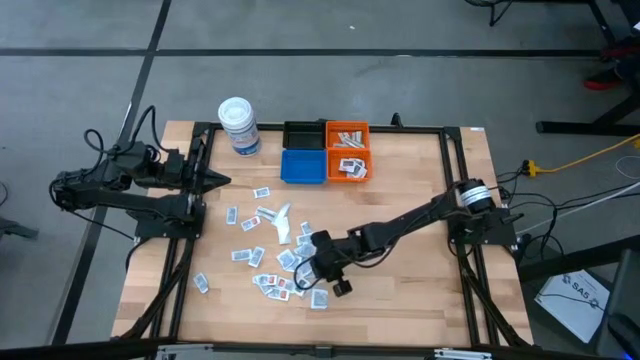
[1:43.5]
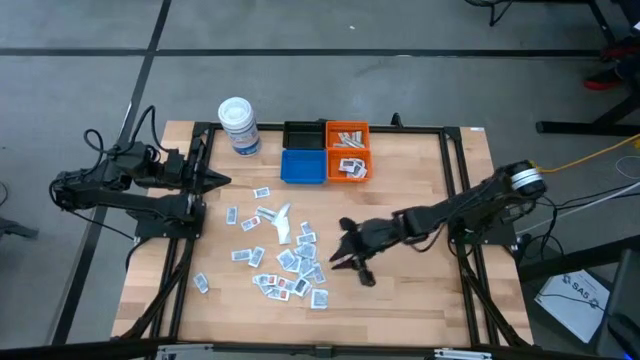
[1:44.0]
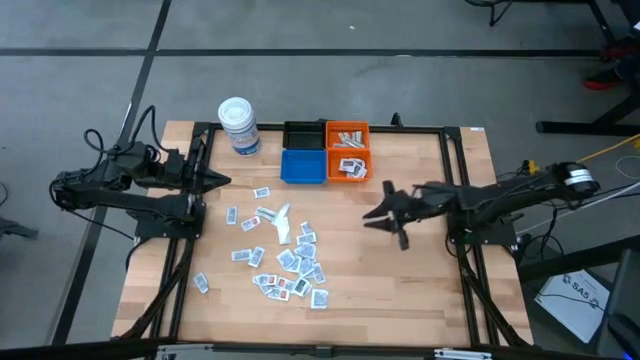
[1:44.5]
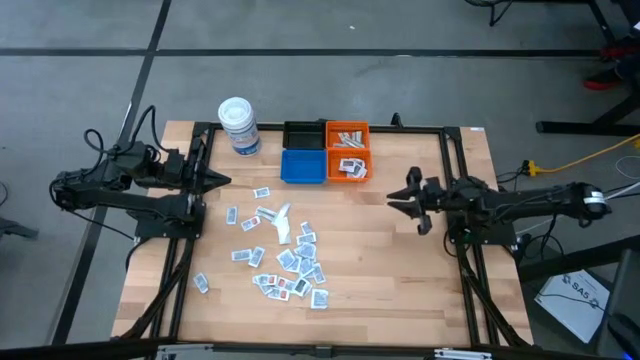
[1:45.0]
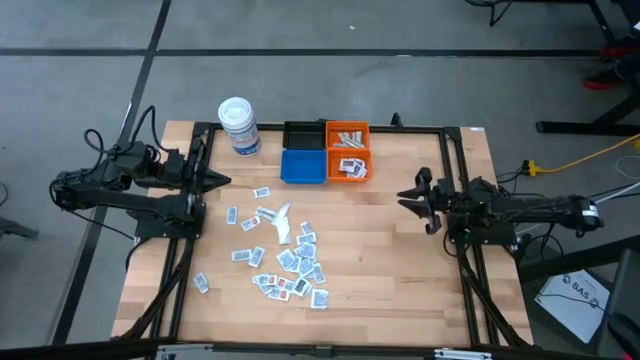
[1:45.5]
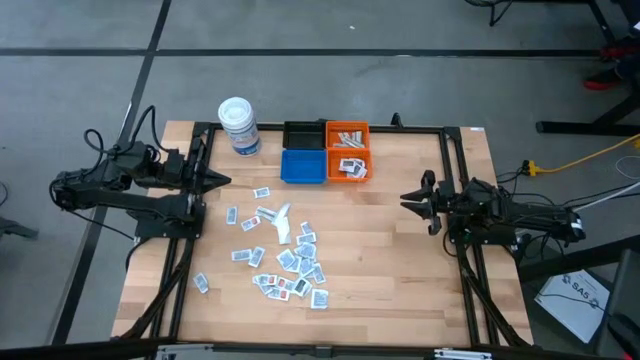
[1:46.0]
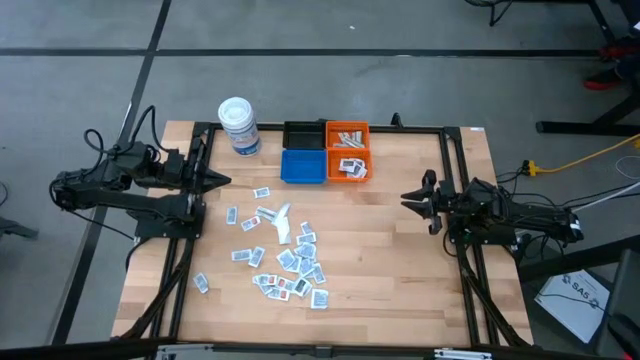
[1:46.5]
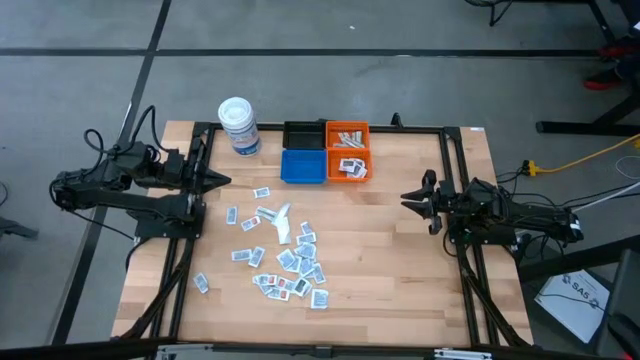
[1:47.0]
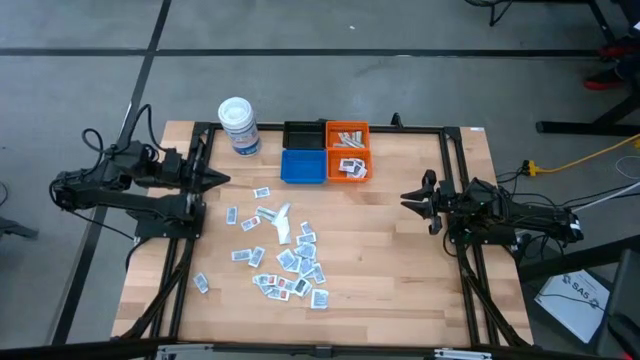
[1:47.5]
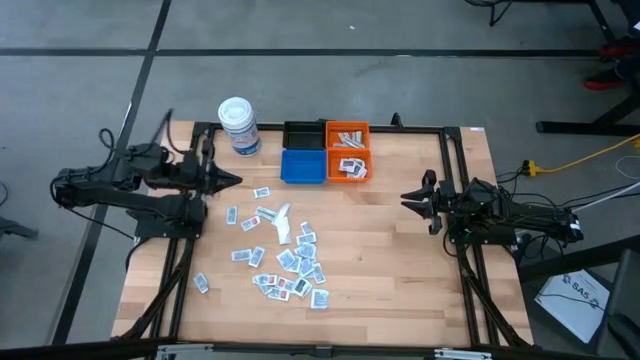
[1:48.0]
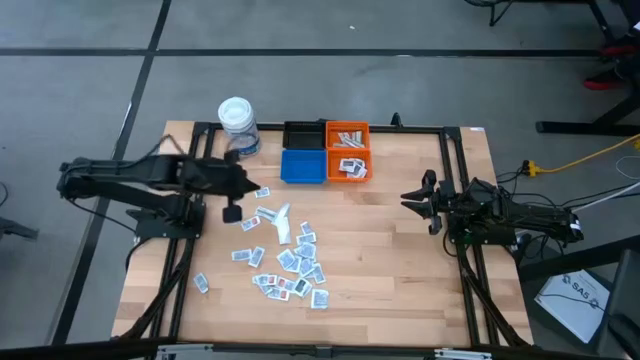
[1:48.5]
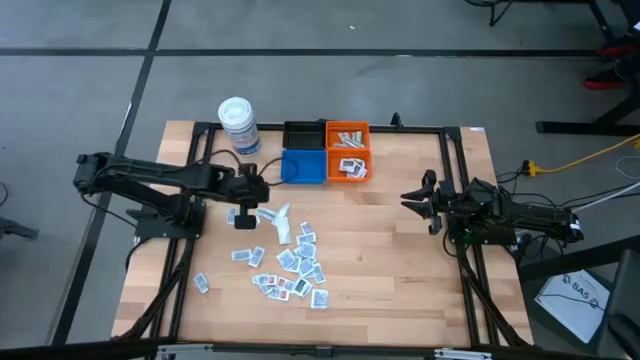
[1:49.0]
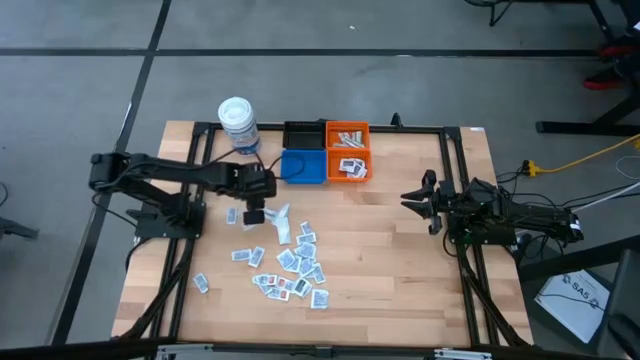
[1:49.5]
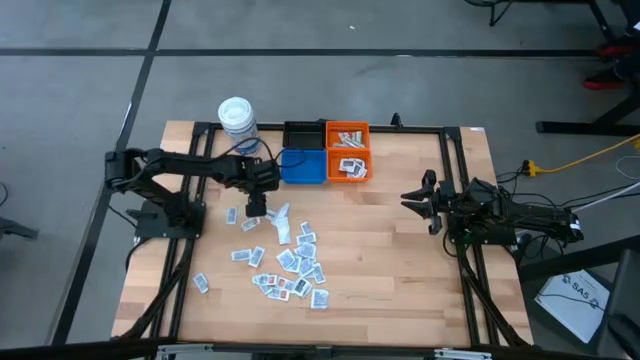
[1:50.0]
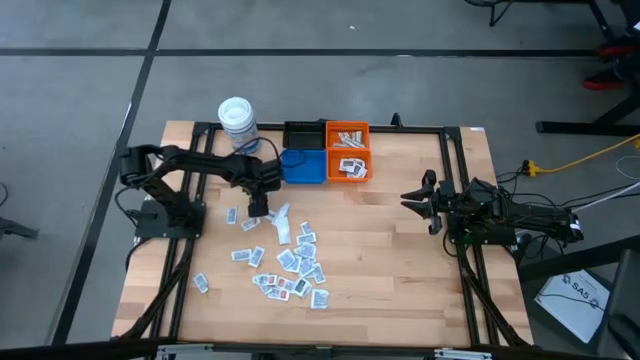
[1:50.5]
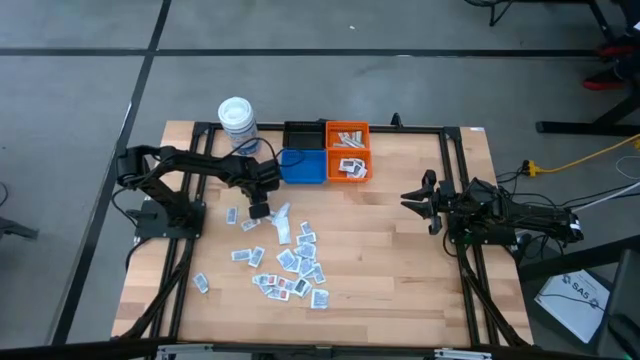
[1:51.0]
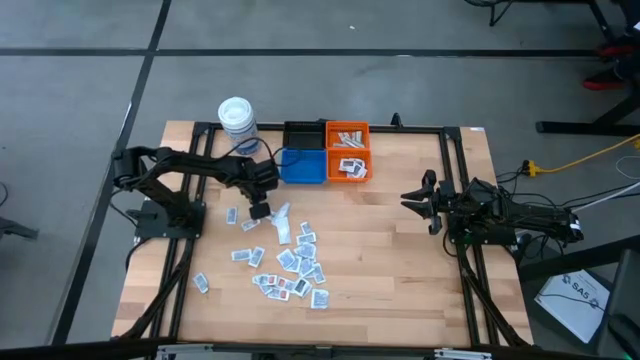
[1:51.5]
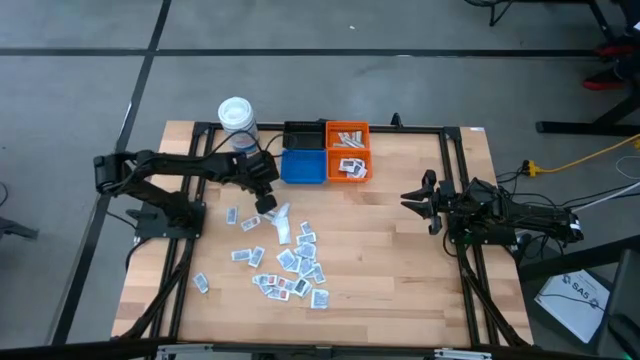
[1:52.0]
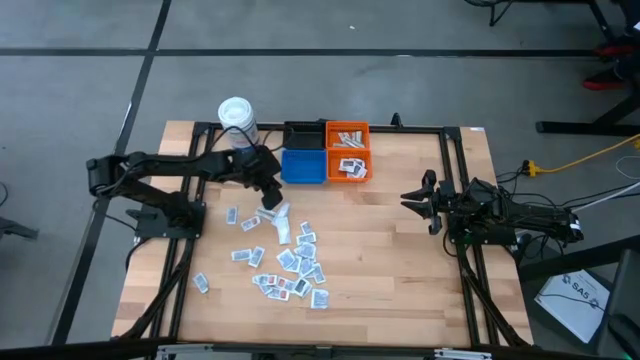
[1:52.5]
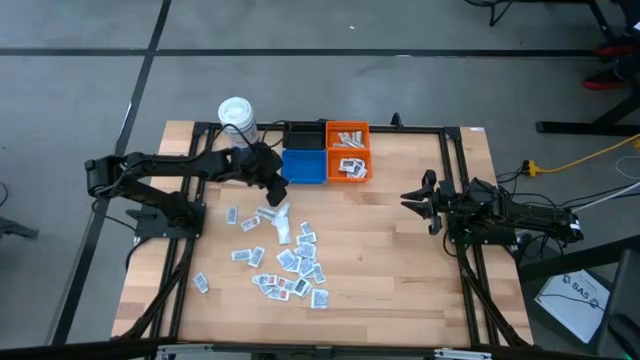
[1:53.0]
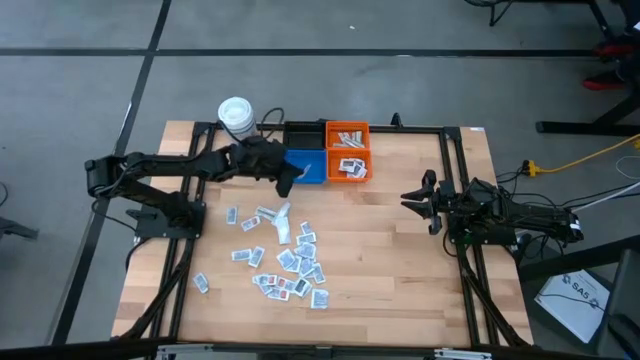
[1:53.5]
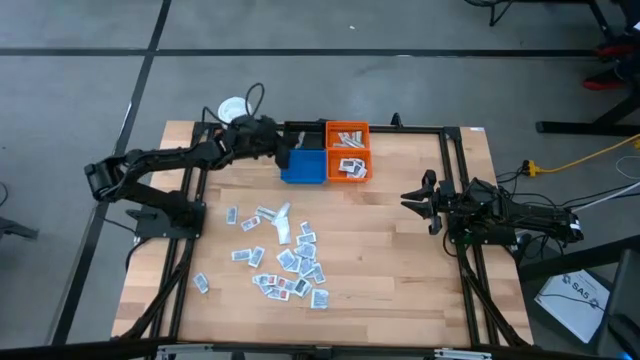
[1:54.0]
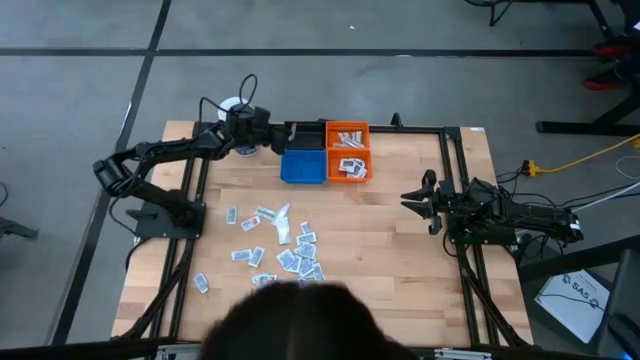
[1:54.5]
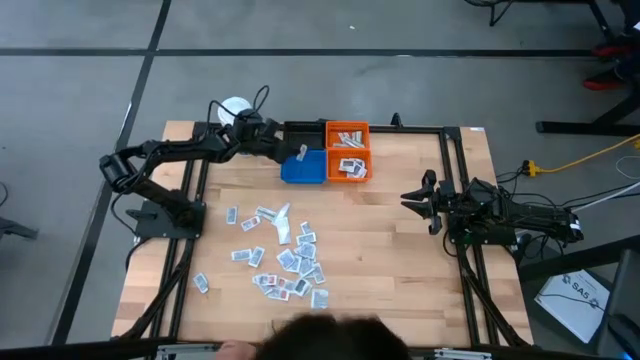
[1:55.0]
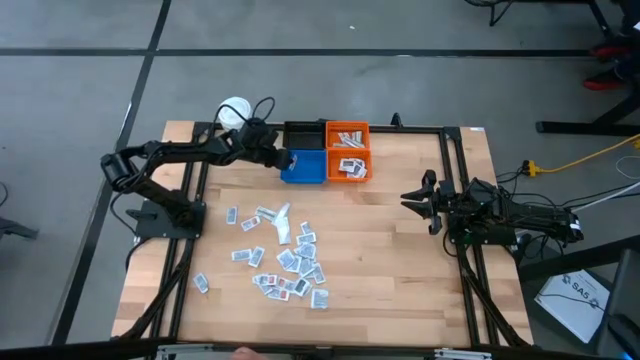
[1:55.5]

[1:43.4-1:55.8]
Task: Pick & Place First Aid Supplies
Put the ointment pack into the blue bin

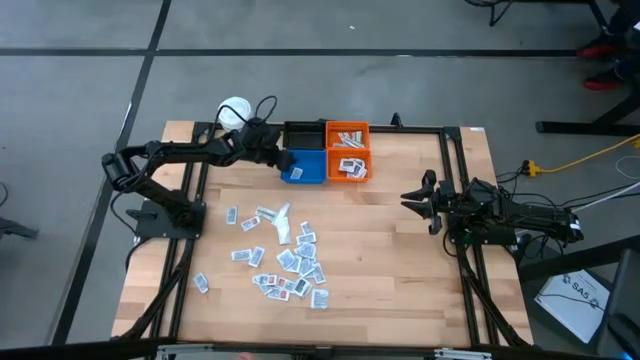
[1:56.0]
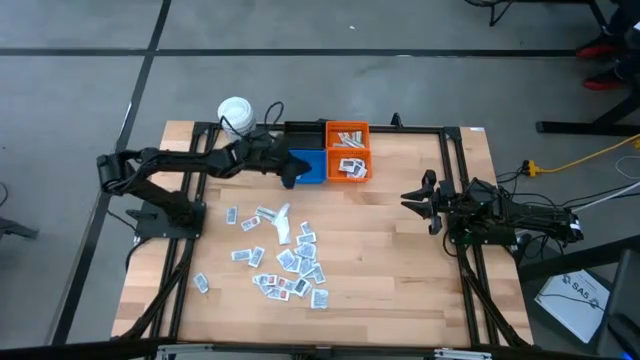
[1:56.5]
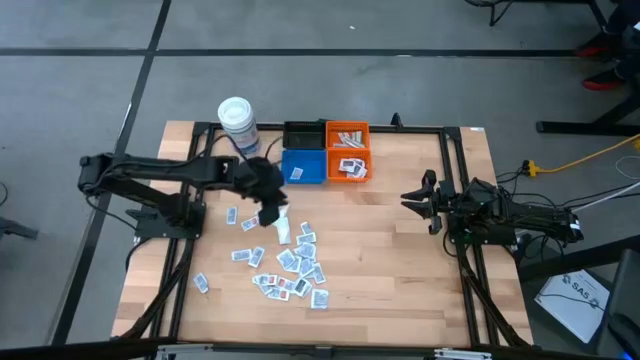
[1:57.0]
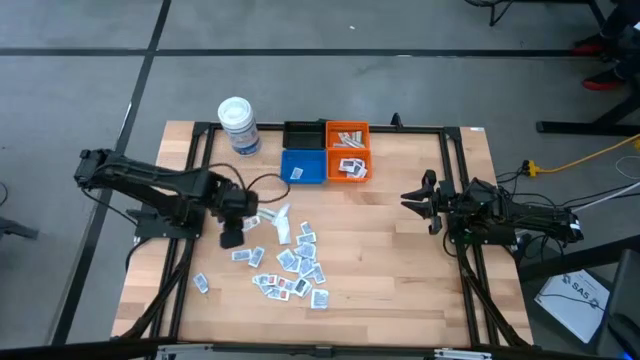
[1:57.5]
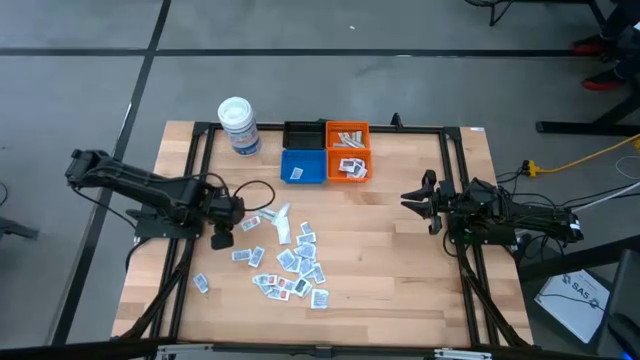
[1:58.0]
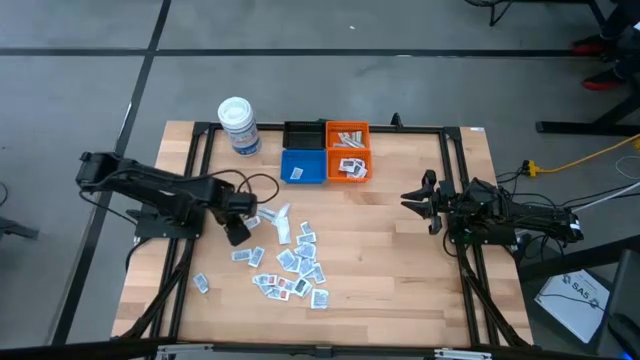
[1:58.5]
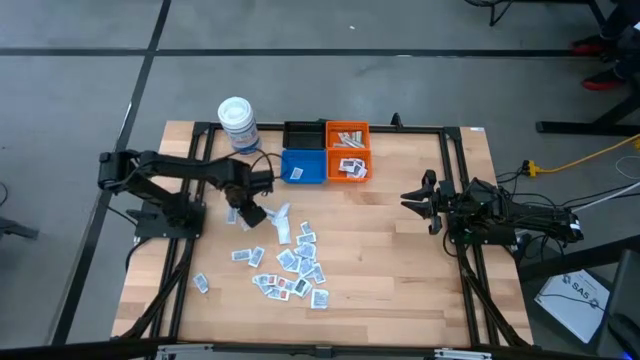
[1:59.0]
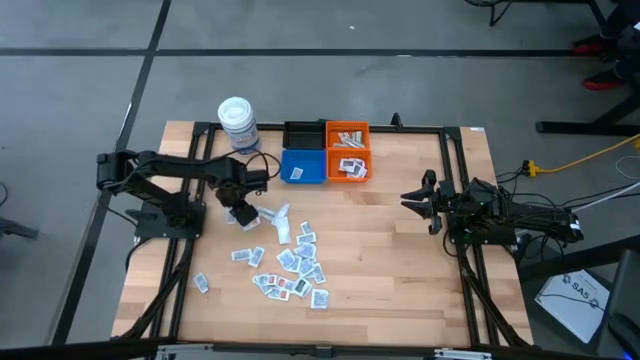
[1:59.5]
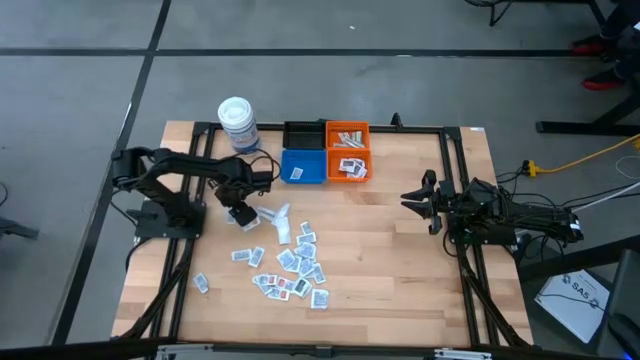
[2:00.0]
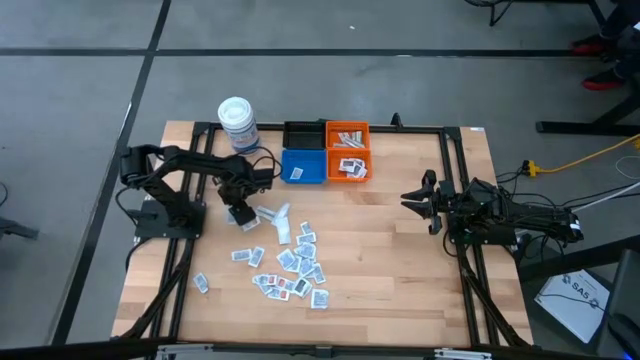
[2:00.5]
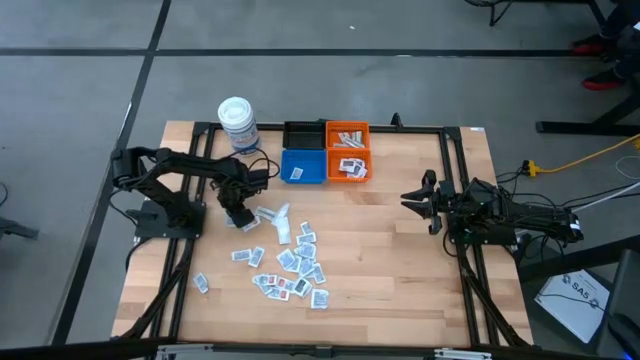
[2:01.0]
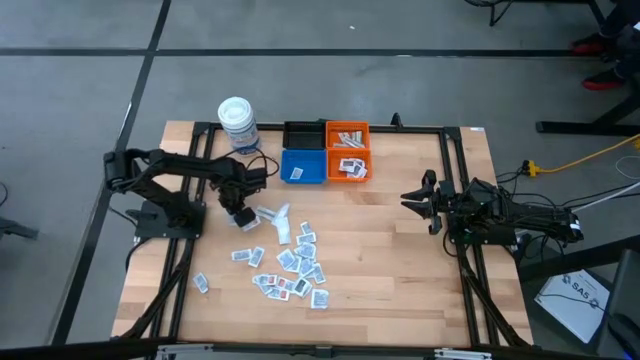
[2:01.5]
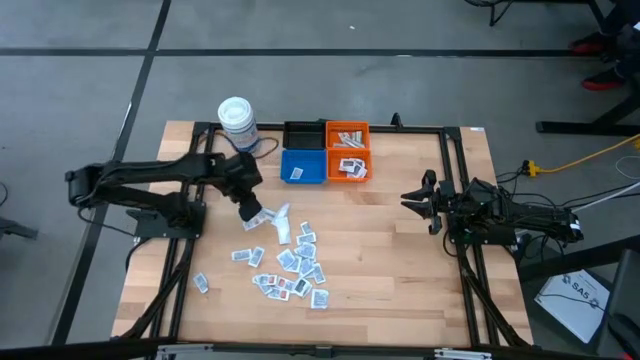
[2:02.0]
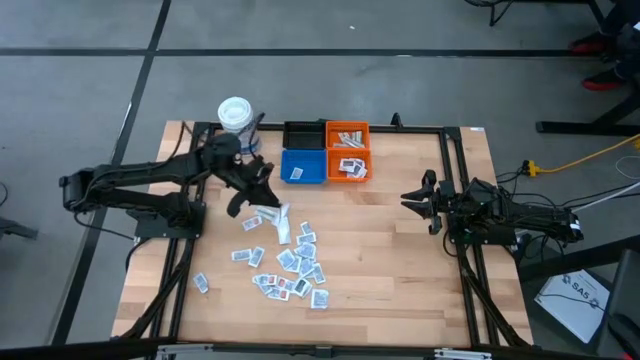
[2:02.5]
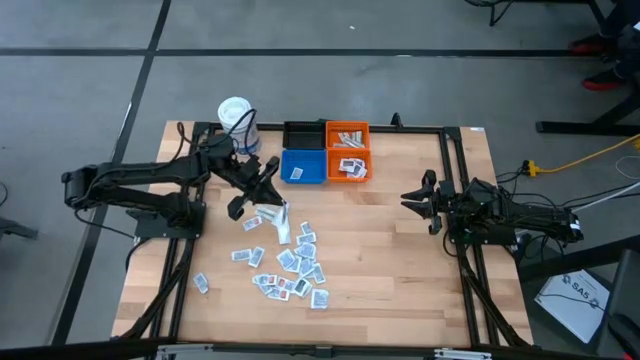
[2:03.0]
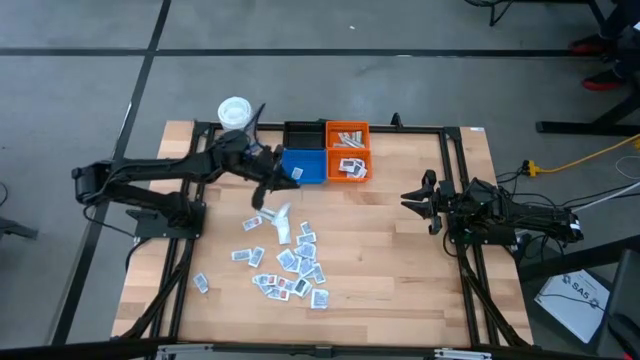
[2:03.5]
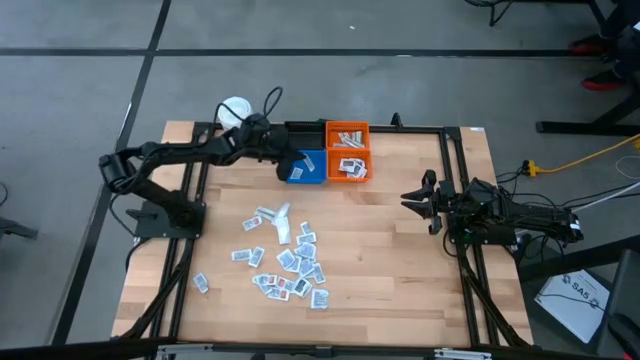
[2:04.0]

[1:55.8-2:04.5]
Put the ointment pack into the blue bin

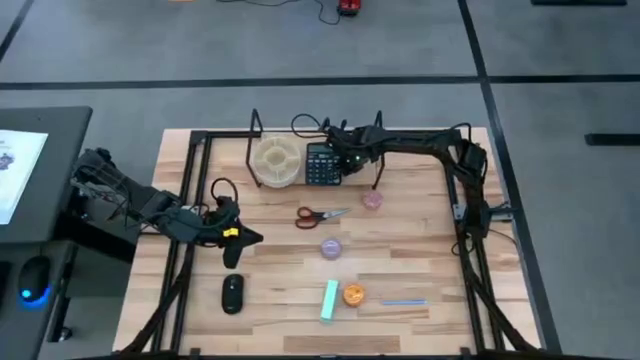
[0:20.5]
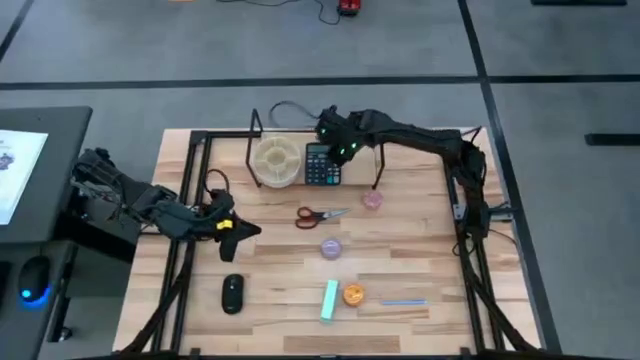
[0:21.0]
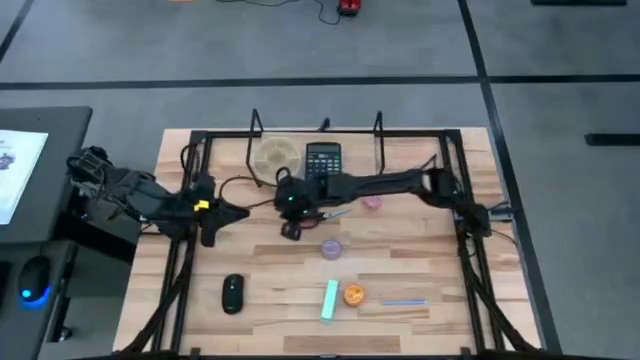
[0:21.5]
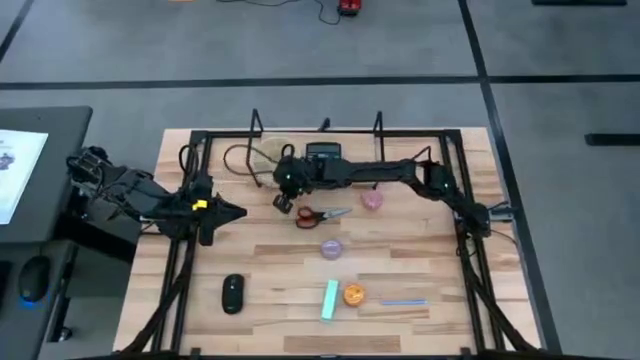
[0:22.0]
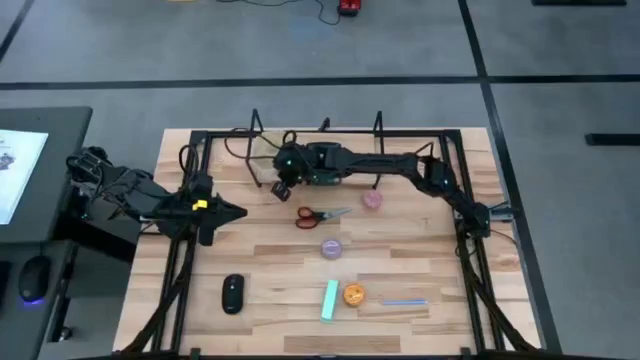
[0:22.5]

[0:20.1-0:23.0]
Task: Stock shelves
Adjust the white pen organizer
